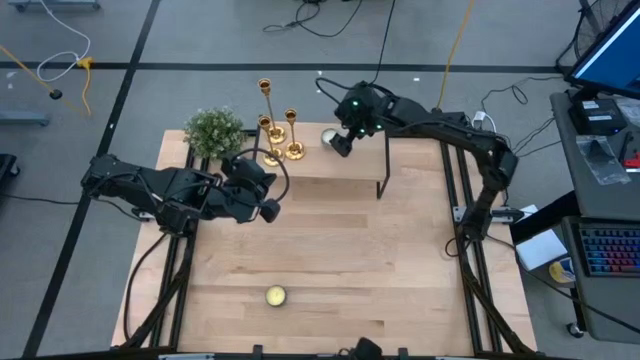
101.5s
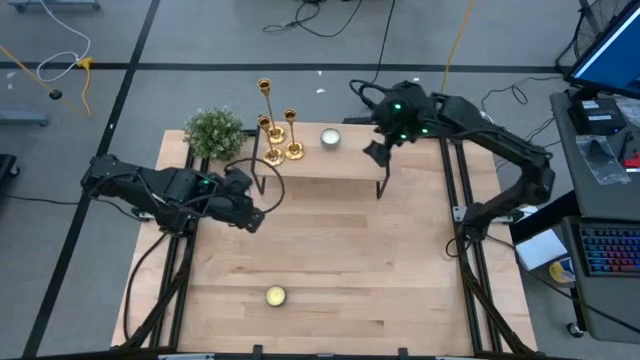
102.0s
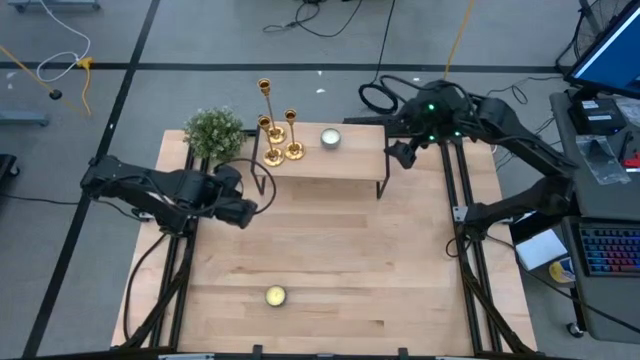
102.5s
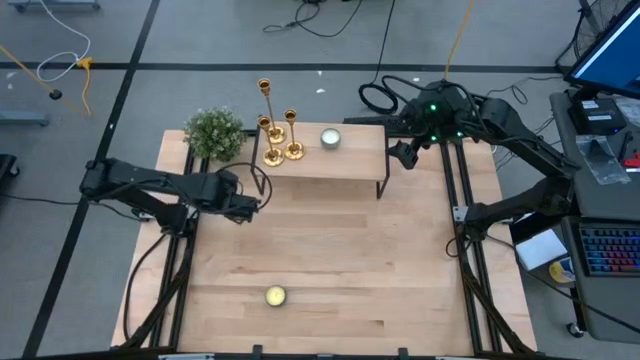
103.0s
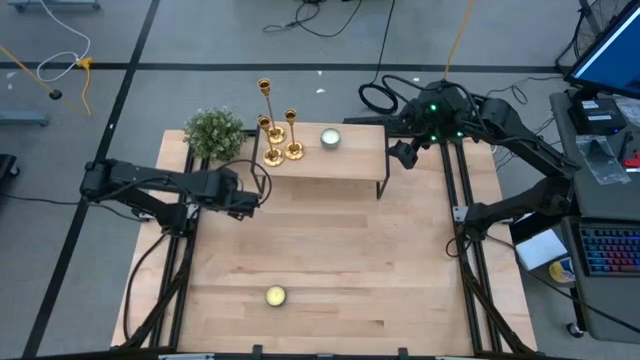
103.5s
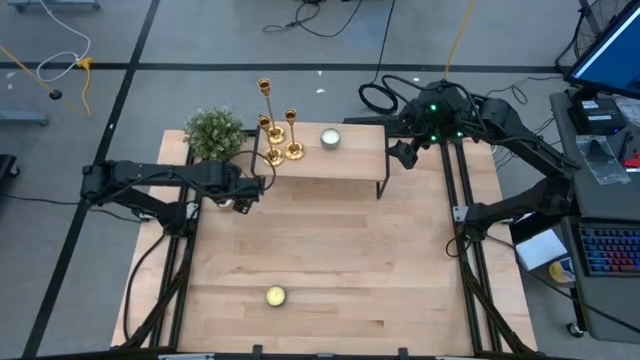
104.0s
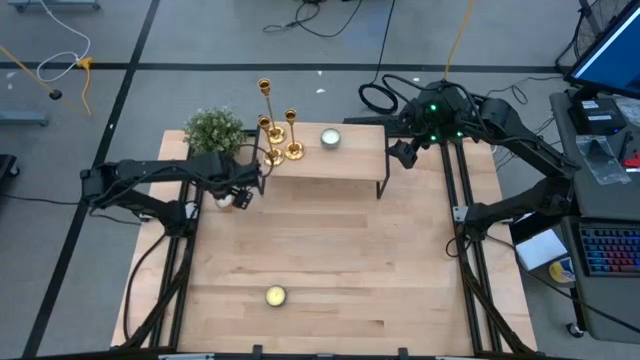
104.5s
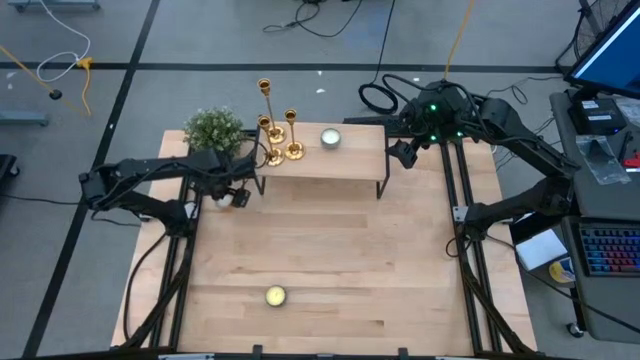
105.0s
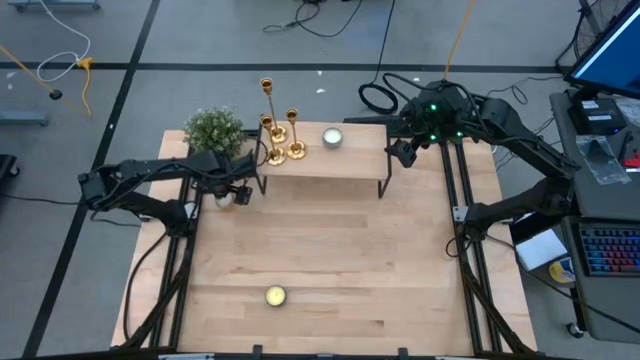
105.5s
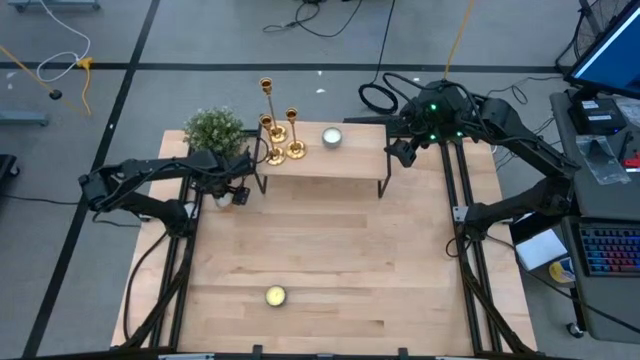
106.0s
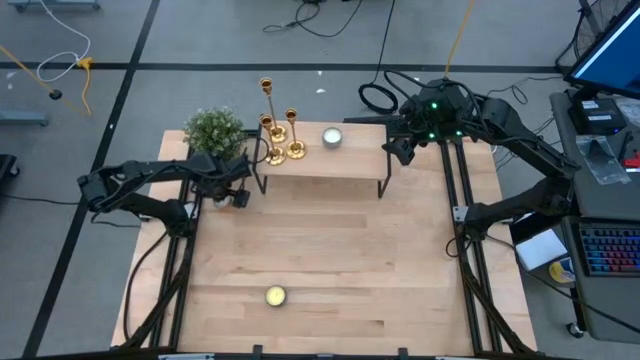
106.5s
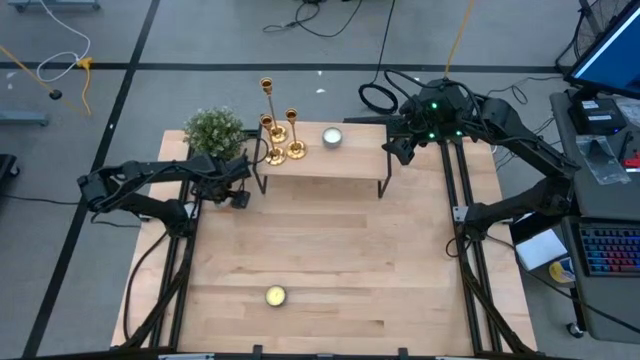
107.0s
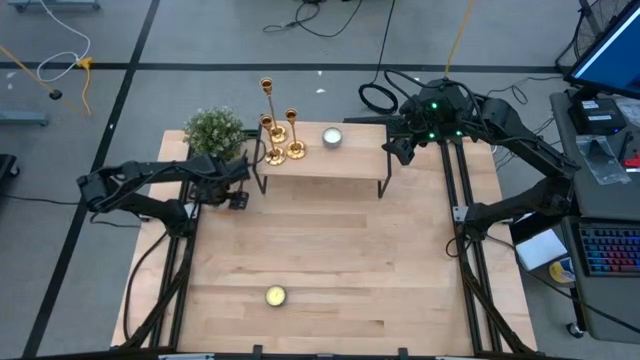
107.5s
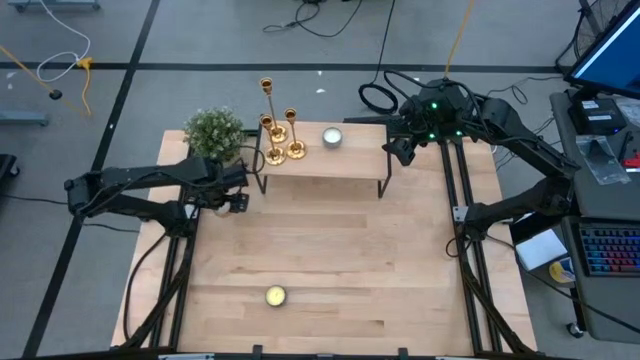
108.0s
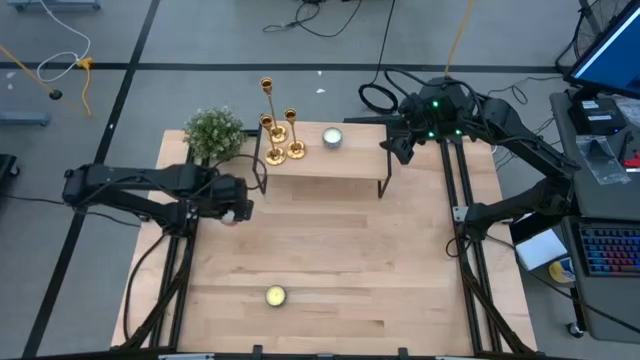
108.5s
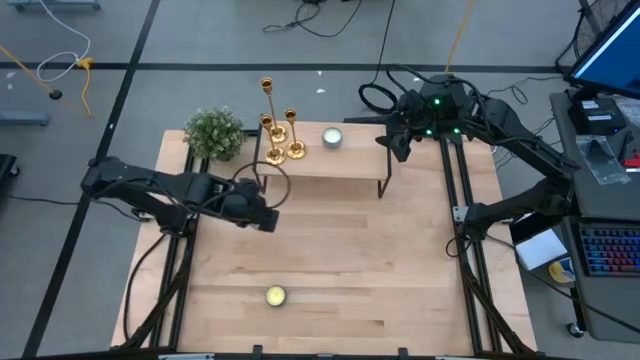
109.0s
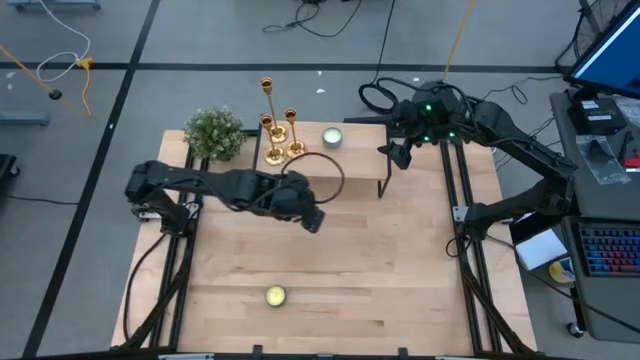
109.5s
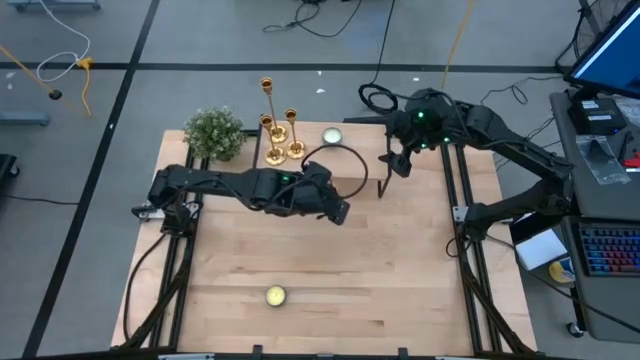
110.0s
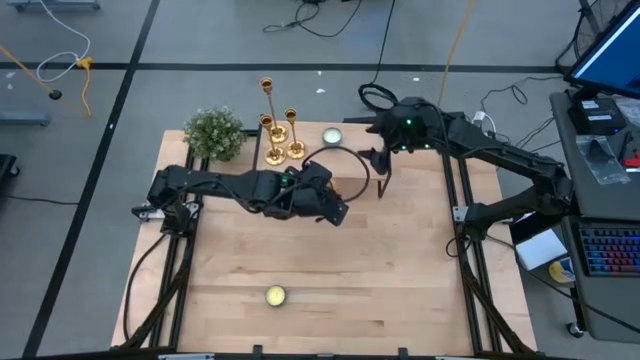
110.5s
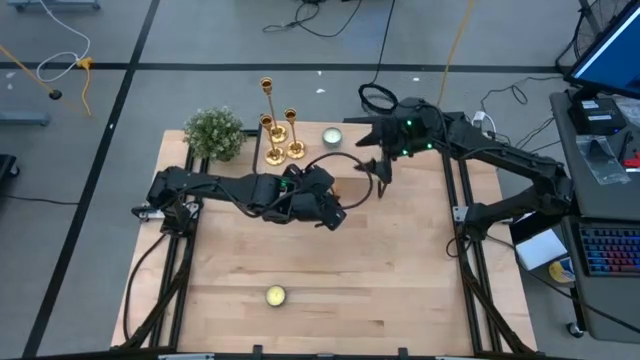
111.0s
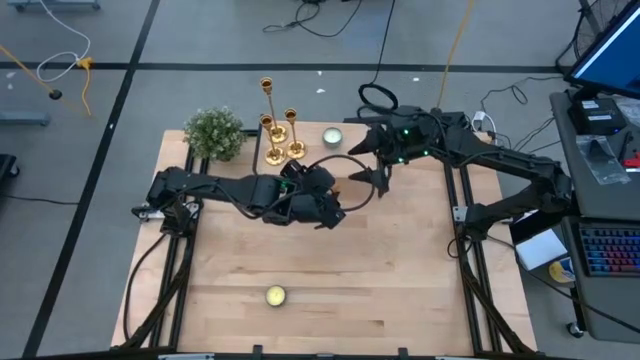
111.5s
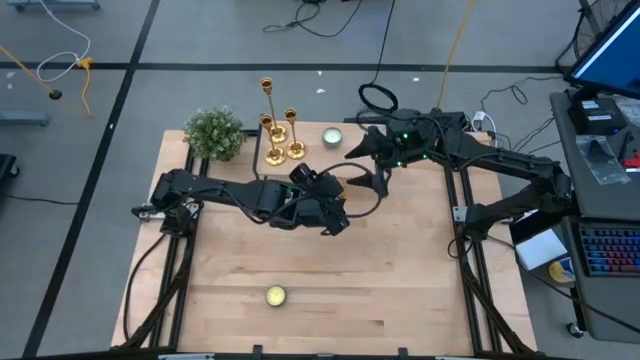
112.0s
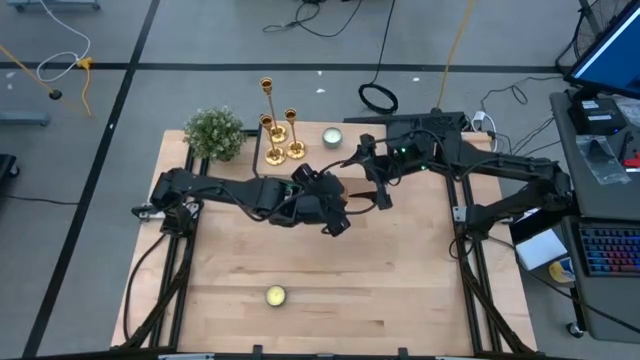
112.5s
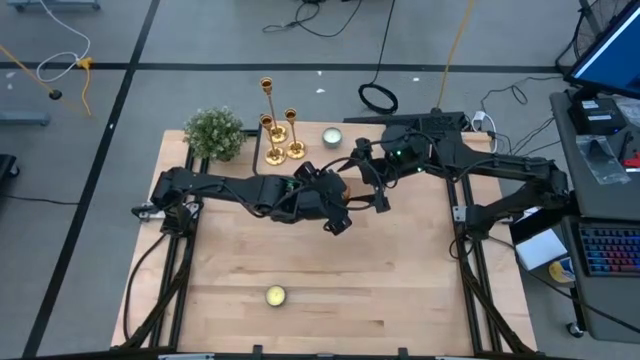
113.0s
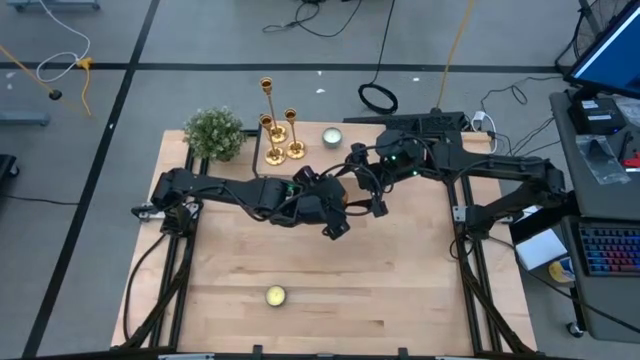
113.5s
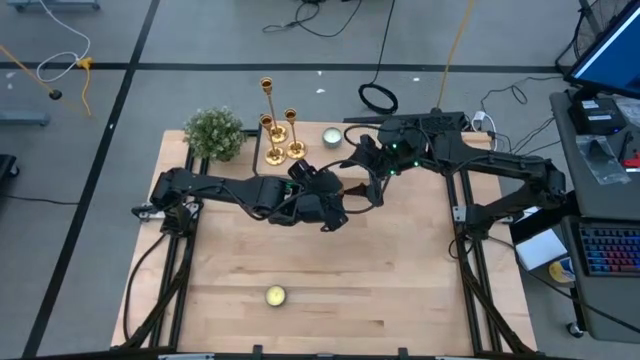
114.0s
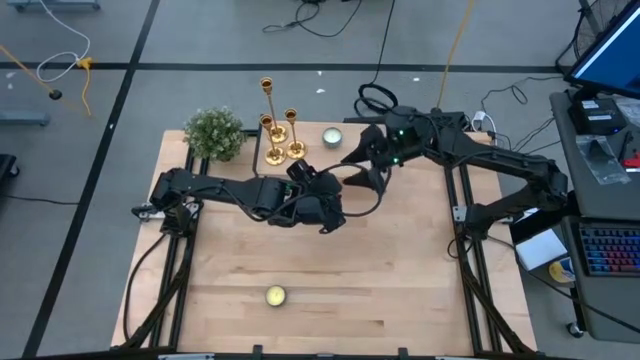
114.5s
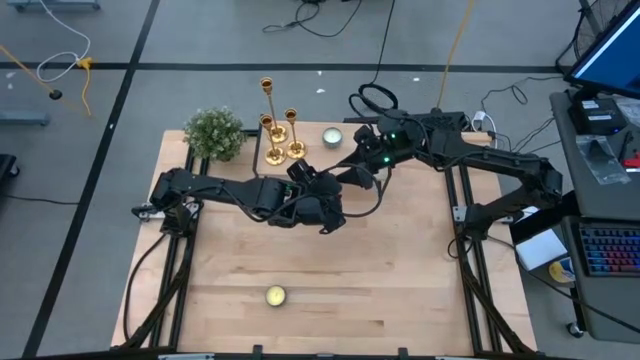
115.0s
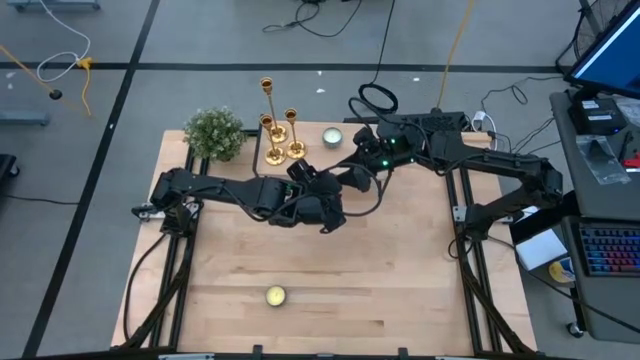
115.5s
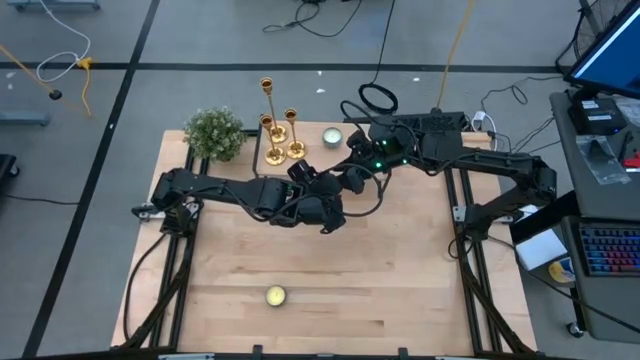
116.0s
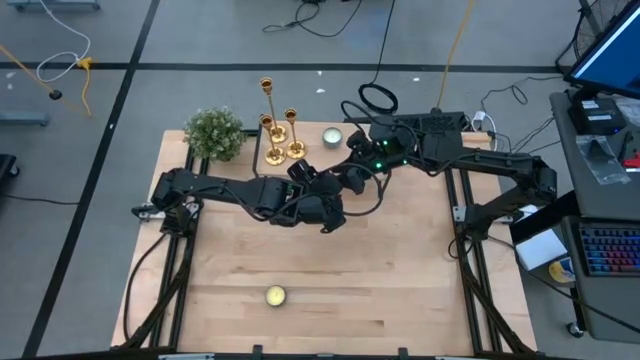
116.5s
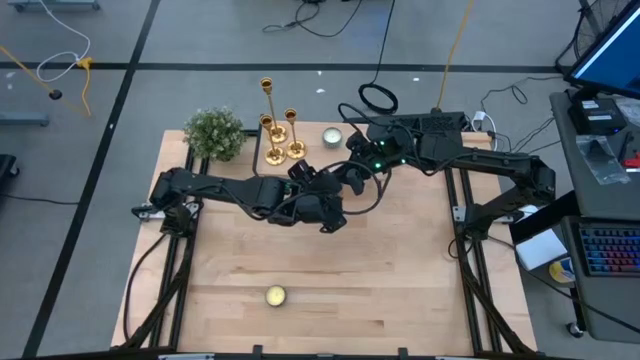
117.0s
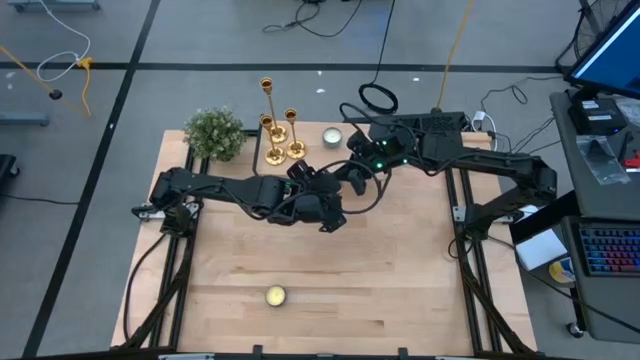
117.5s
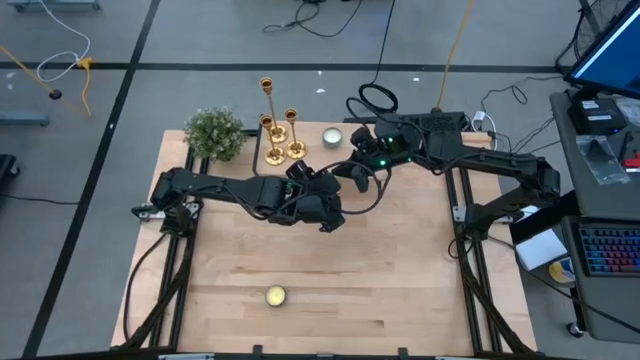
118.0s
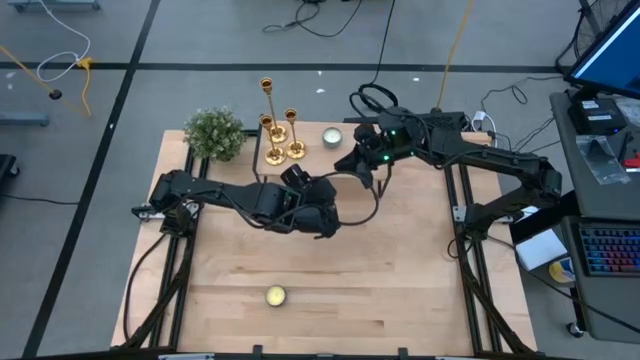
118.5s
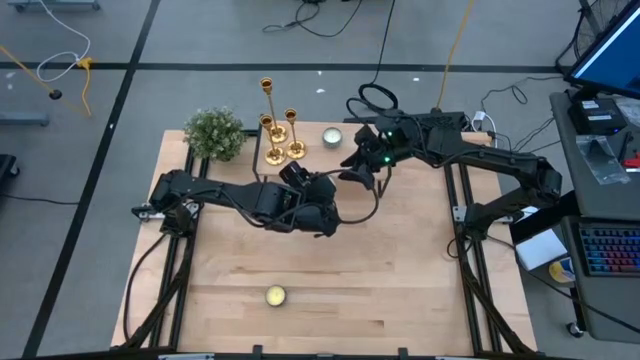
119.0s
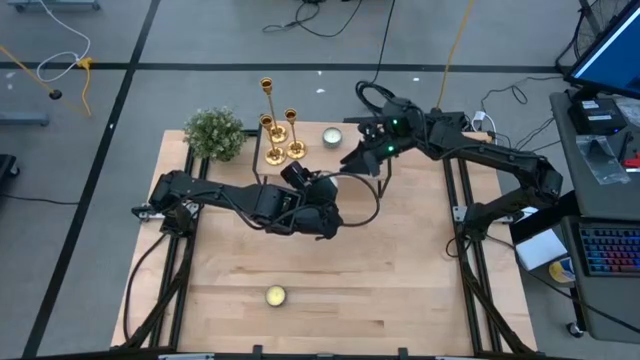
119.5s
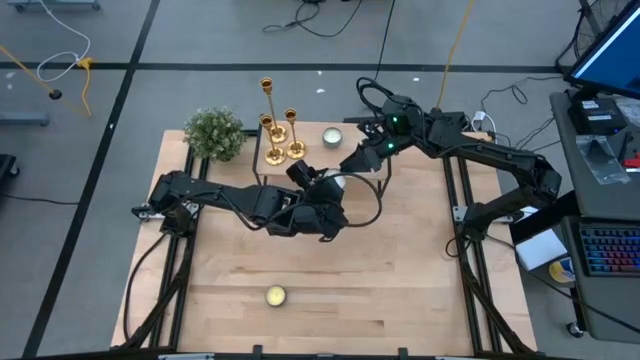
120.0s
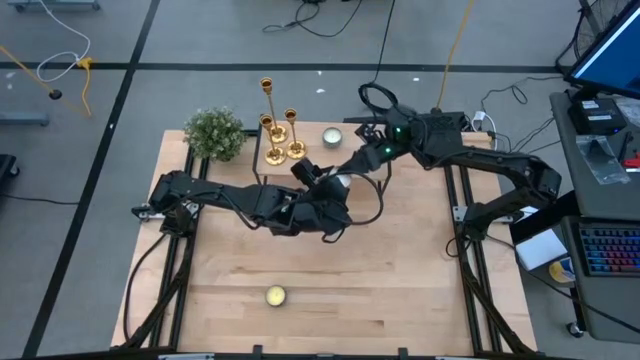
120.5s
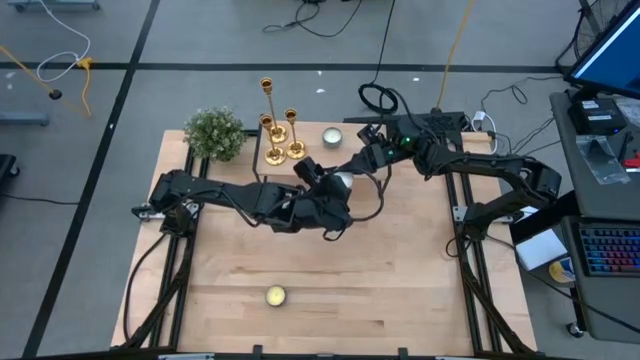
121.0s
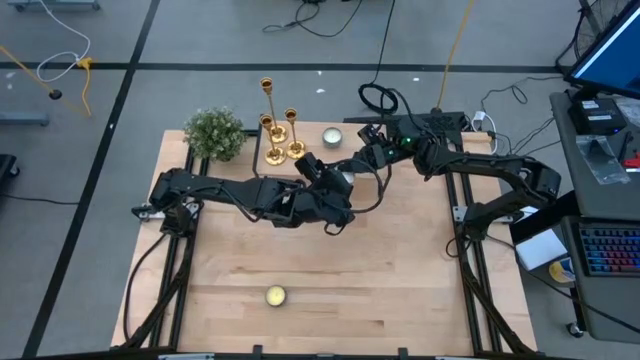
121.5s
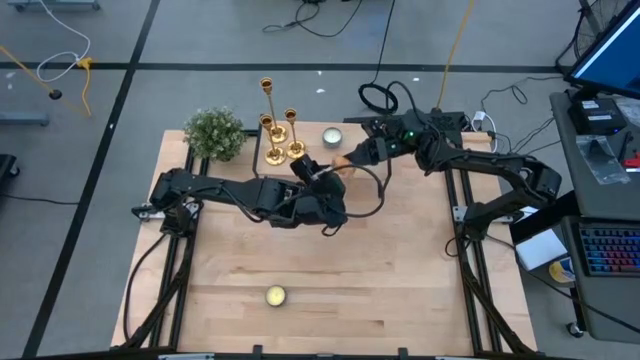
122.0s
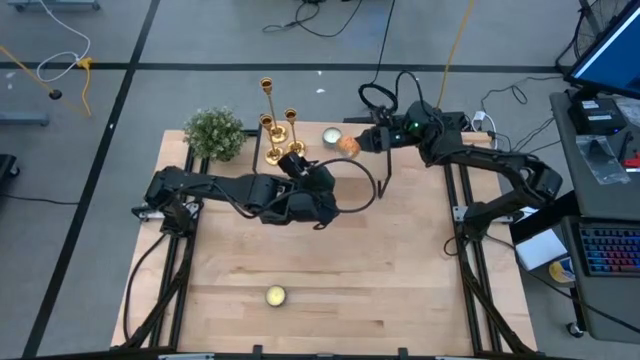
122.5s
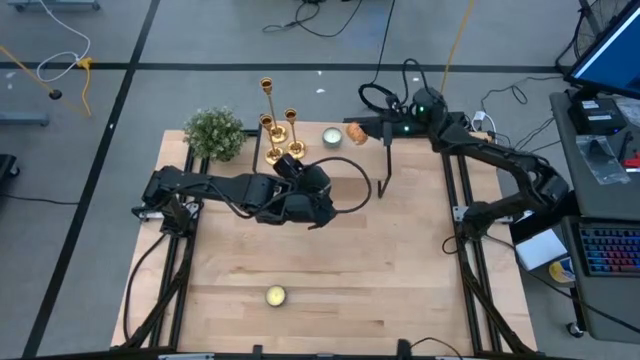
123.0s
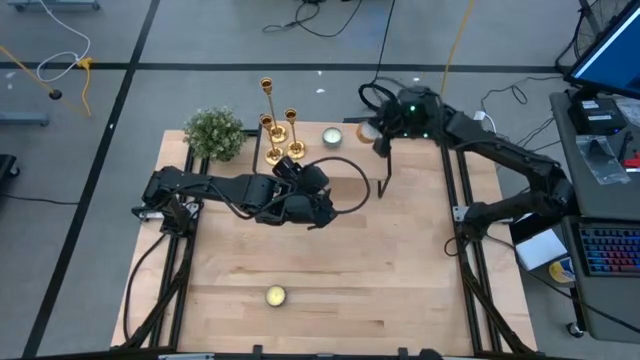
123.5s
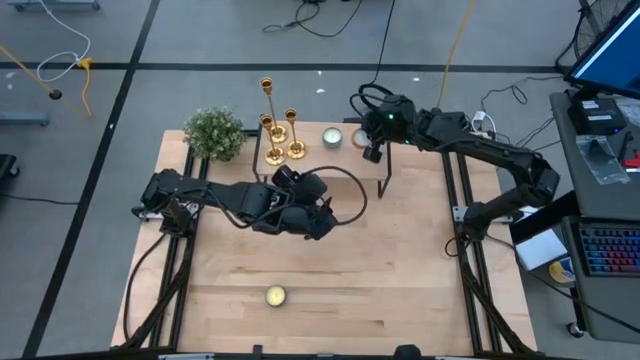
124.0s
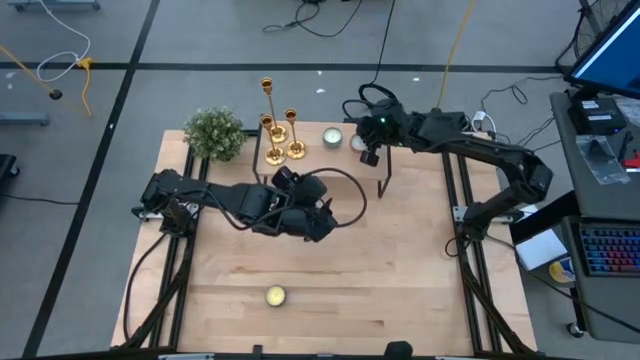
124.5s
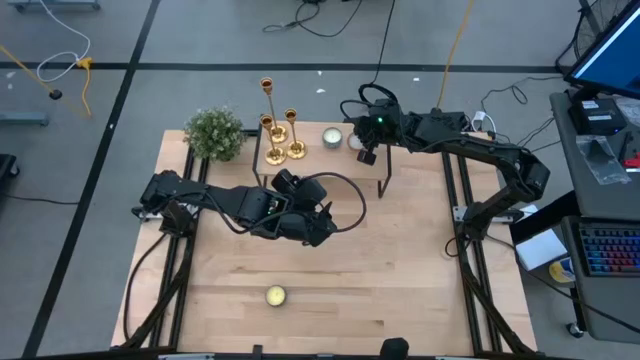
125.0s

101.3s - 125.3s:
Task: Pick & Place candle stick holders
Put the orange scented candle on the shelf
